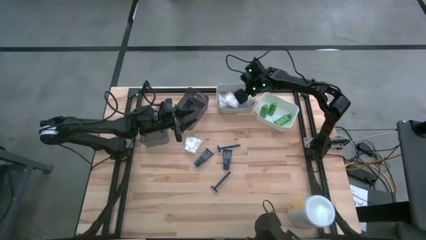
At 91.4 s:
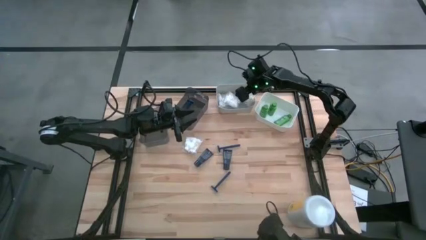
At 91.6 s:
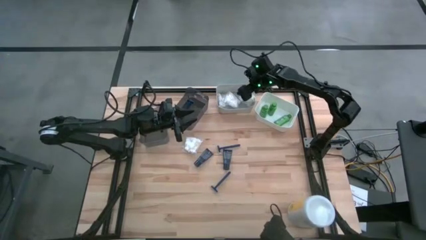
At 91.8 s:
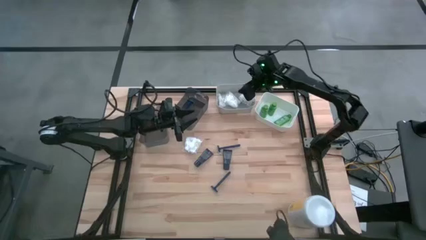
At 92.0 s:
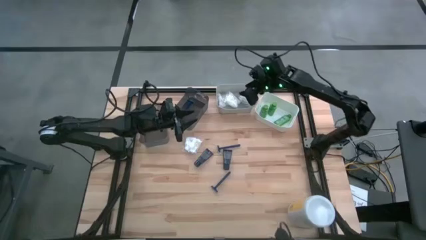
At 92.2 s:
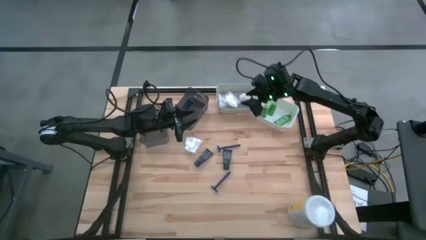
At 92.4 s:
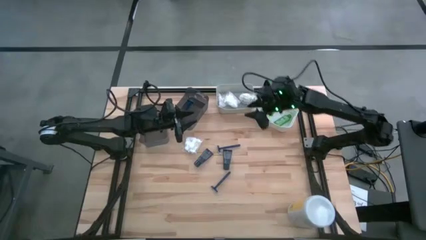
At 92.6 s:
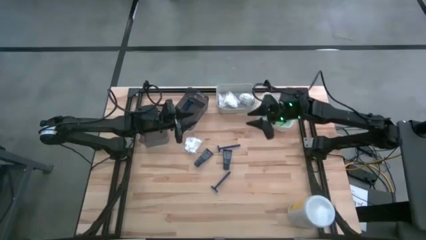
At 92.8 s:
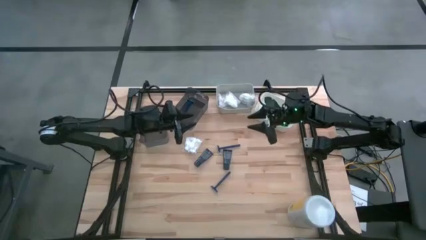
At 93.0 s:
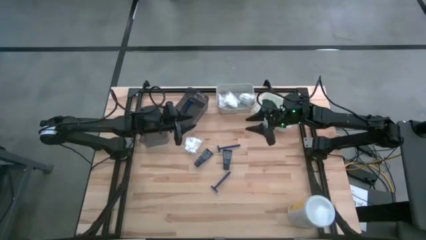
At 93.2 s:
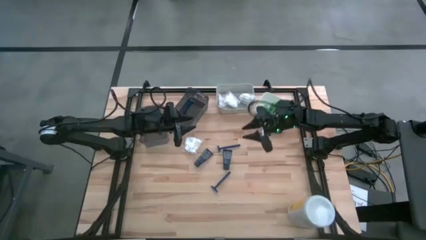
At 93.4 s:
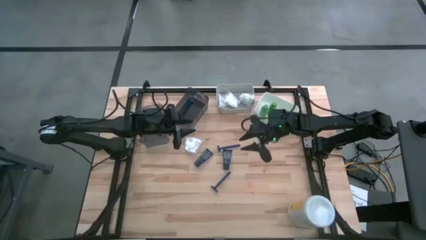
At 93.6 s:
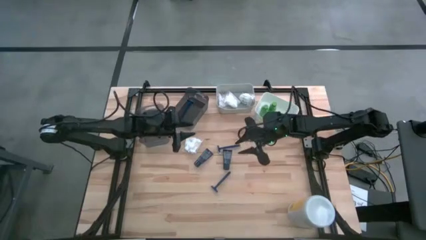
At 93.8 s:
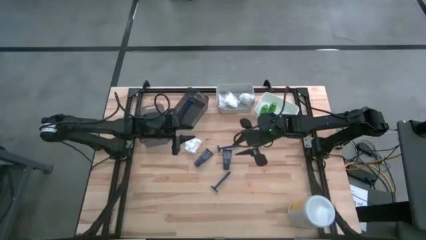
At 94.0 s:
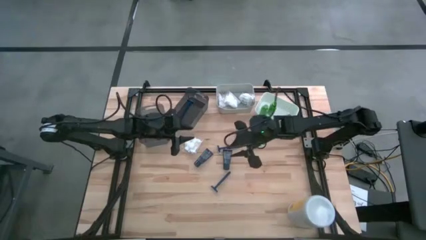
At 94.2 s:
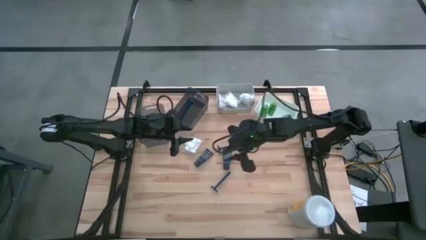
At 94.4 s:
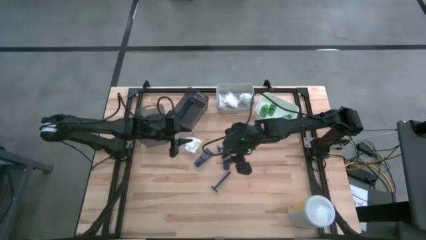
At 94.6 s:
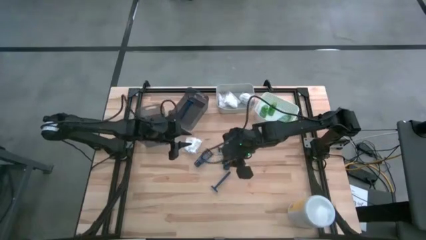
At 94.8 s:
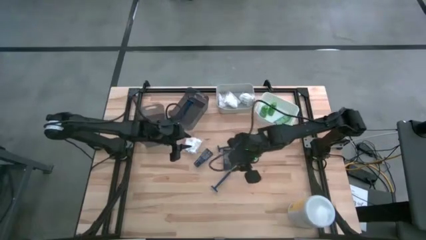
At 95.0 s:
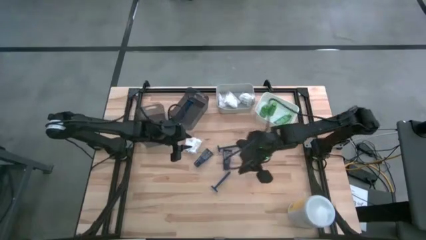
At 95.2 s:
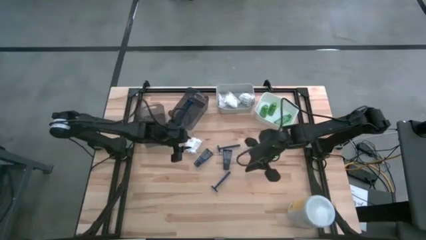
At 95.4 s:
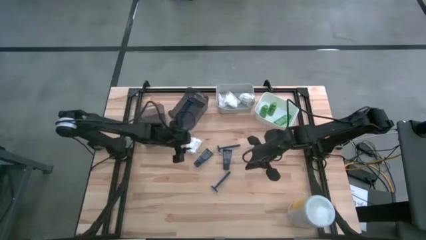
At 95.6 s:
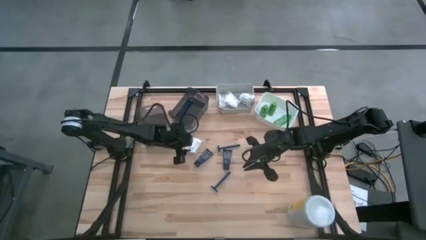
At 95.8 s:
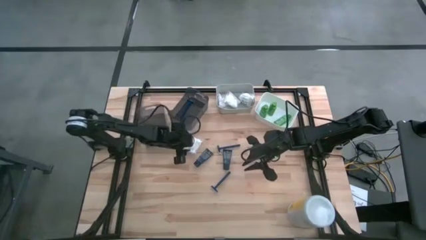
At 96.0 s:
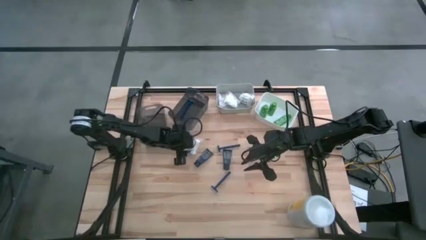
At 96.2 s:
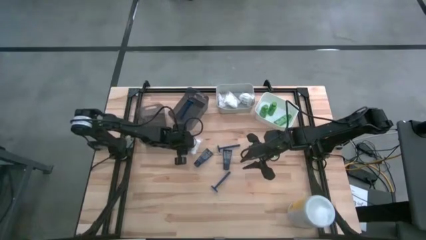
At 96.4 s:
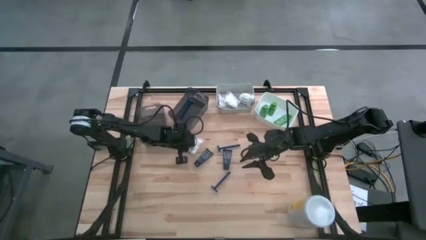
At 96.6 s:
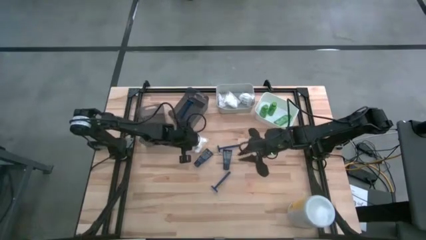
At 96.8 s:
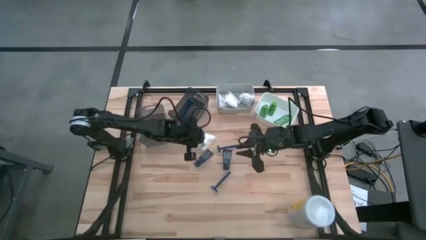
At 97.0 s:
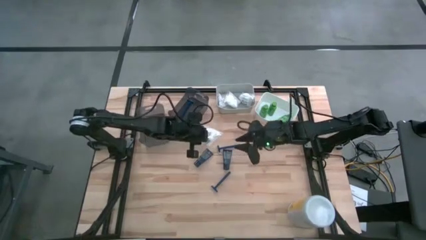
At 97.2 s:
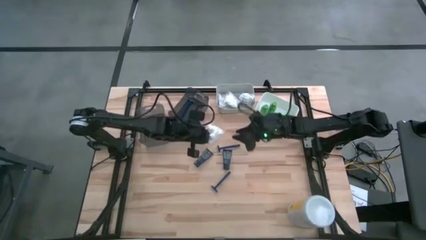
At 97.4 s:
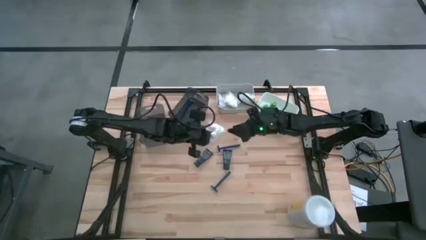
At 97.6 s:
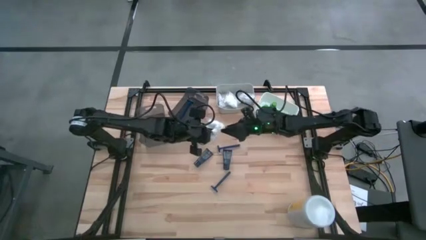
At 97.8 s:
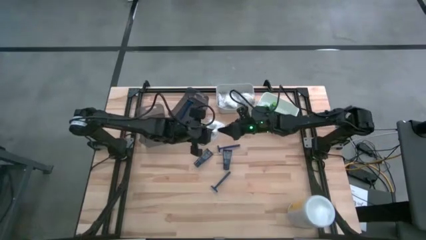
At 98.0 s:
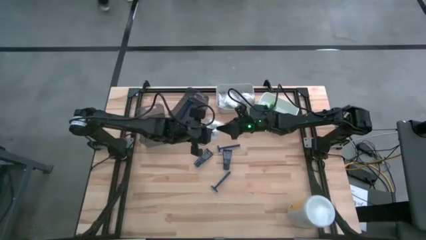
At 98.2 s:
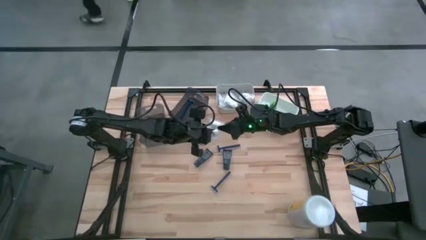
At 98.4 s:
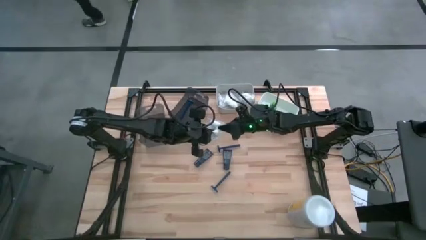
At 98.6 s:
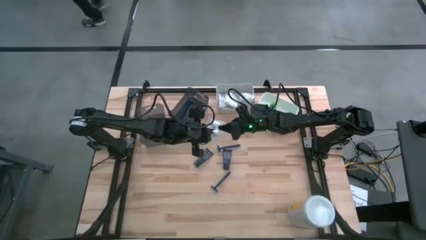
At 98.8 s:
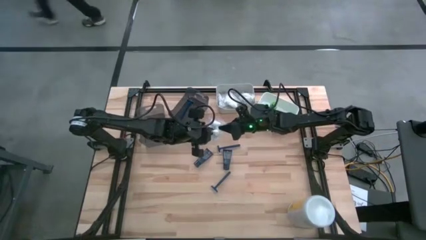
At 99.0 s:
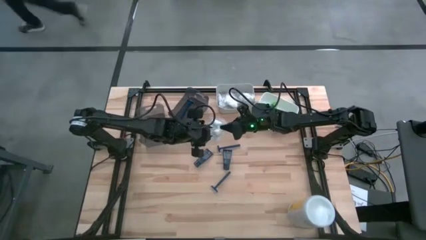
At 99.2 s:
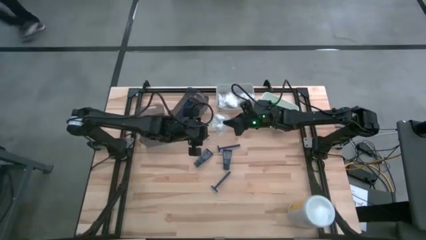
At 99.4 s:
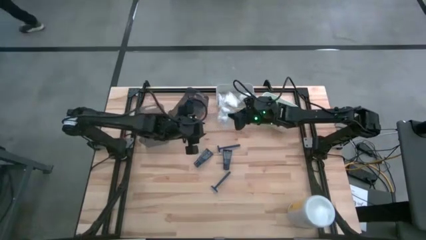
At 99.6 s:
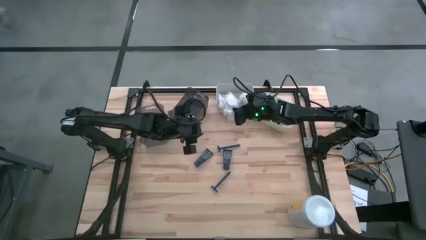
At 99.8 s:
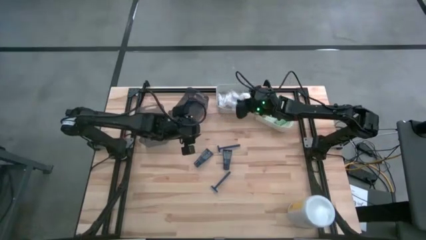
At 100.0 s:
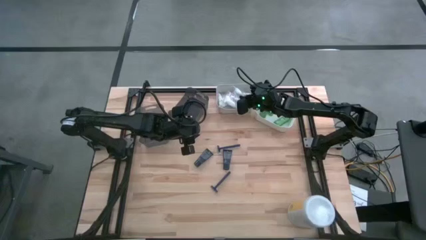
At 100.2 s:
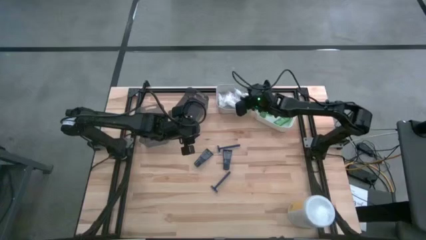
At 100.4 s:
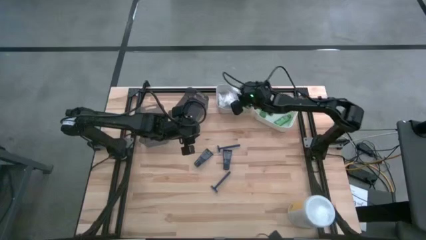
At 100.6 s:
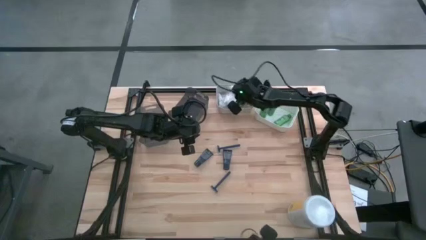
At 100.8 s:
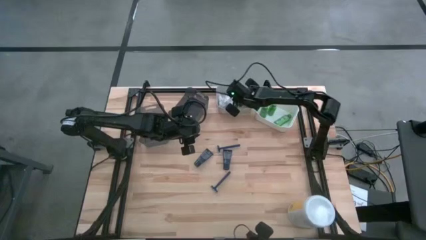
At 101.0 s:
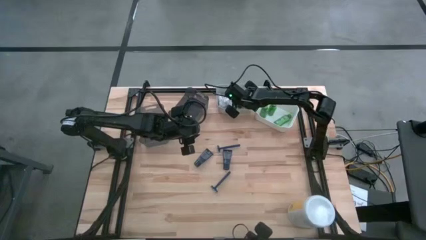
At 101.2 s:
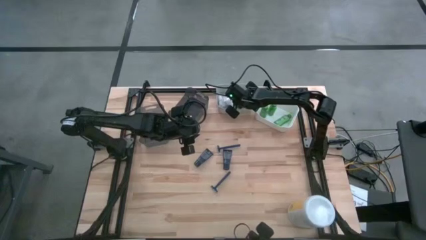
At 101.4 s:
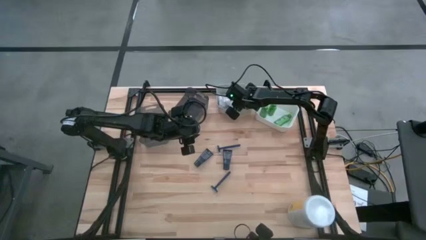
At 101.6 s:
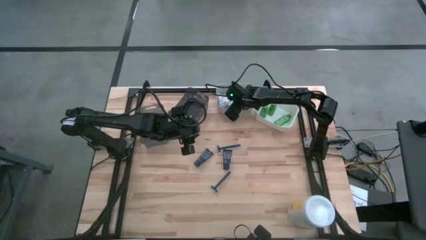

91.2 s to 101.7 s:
Task: Pick & Place Travel size toiletries
Put the cotton pack into the gray bin
